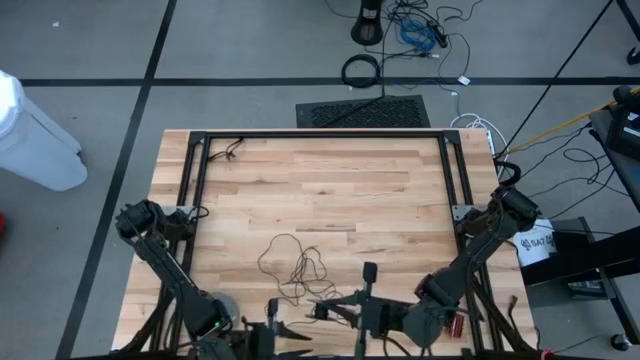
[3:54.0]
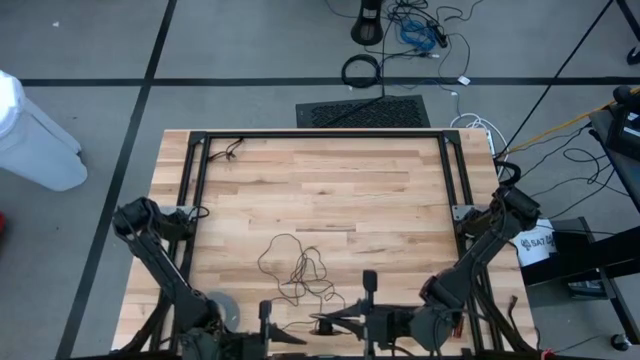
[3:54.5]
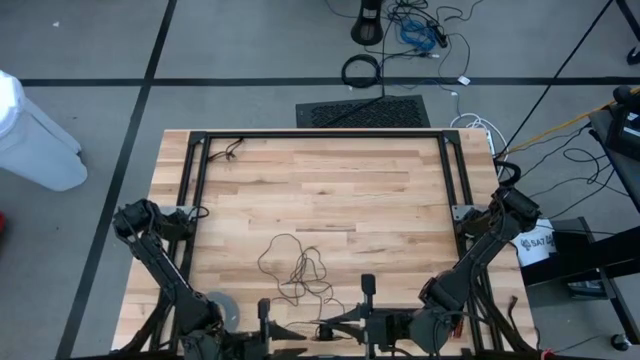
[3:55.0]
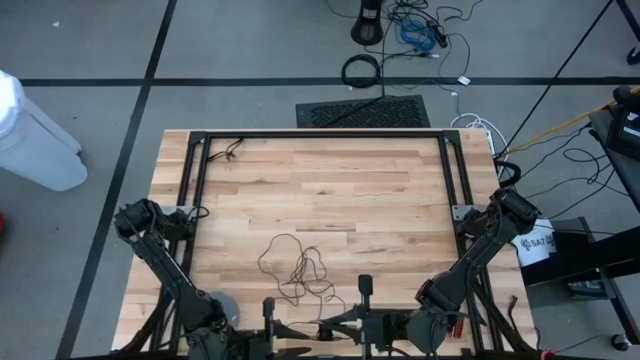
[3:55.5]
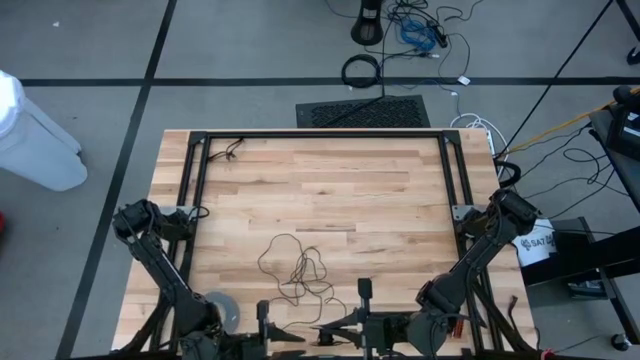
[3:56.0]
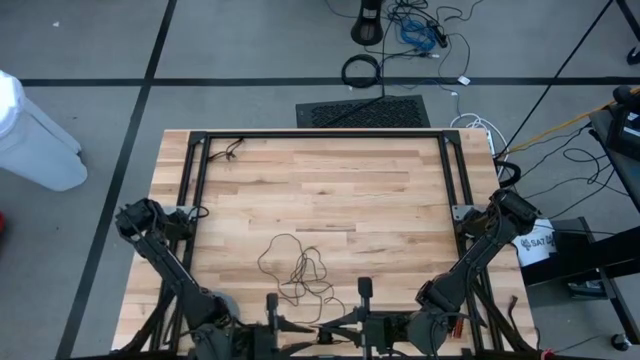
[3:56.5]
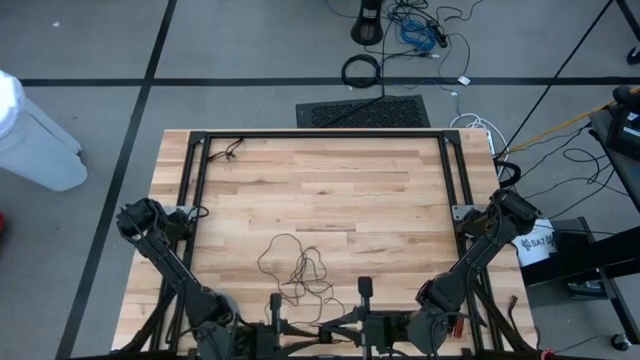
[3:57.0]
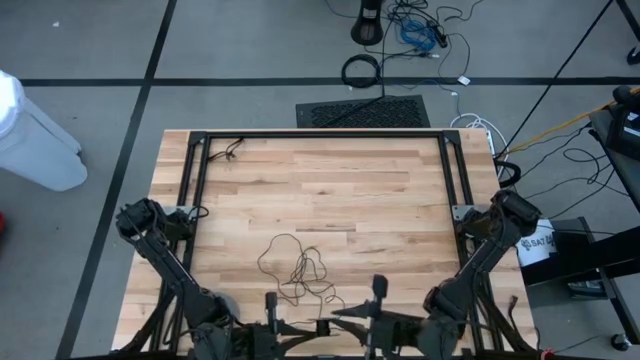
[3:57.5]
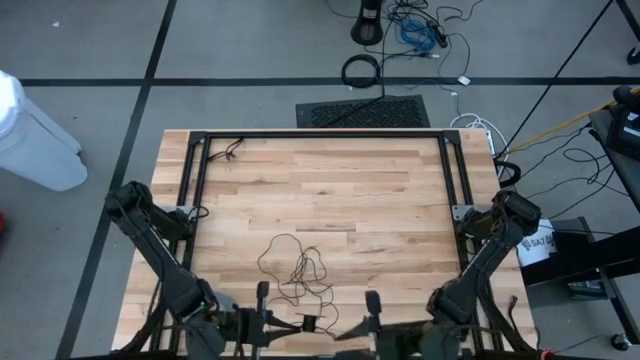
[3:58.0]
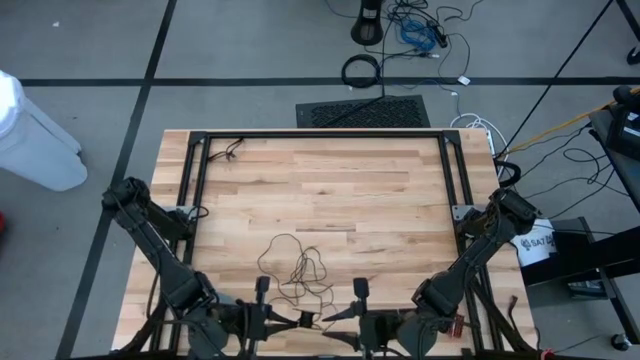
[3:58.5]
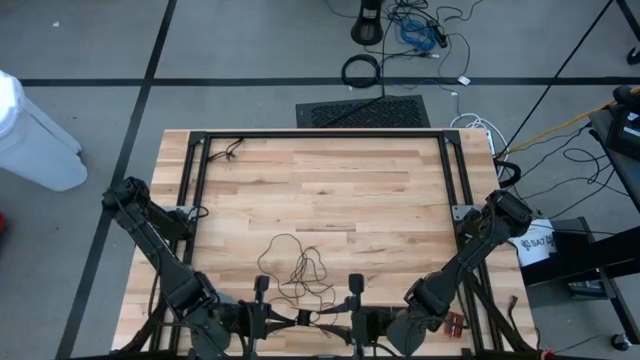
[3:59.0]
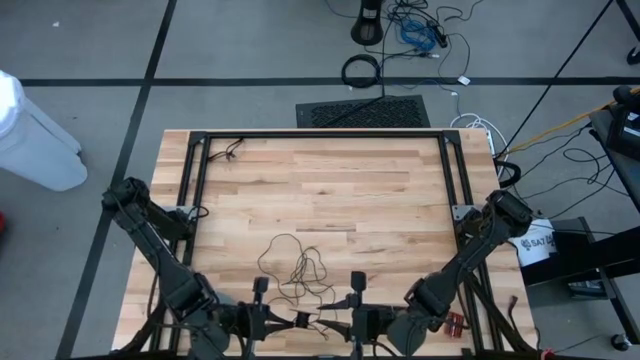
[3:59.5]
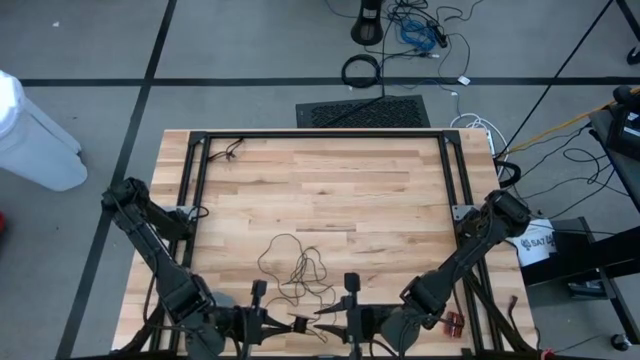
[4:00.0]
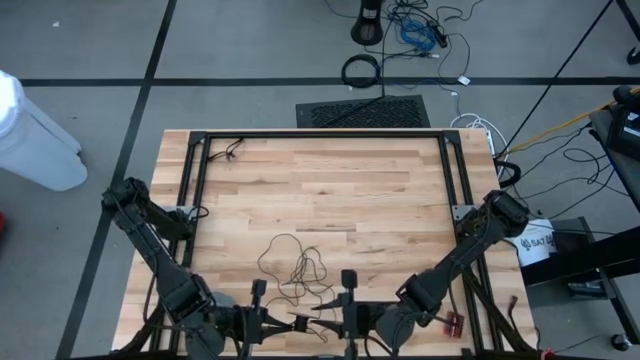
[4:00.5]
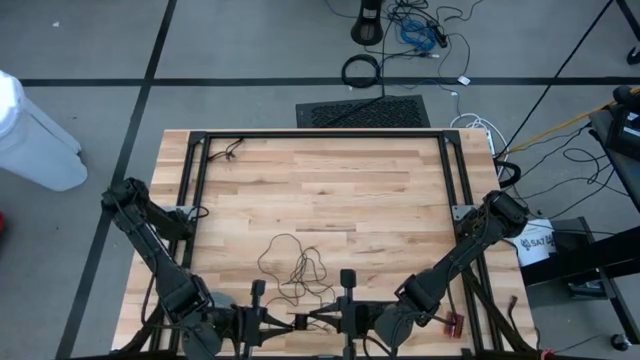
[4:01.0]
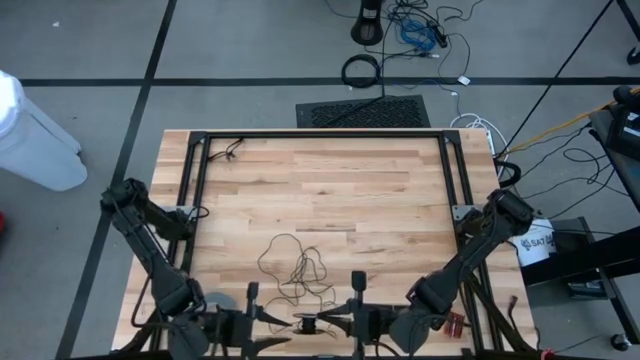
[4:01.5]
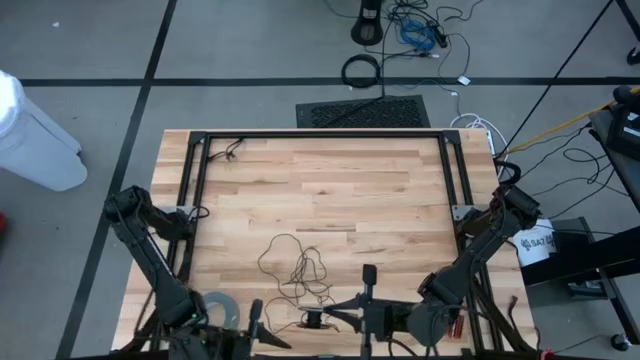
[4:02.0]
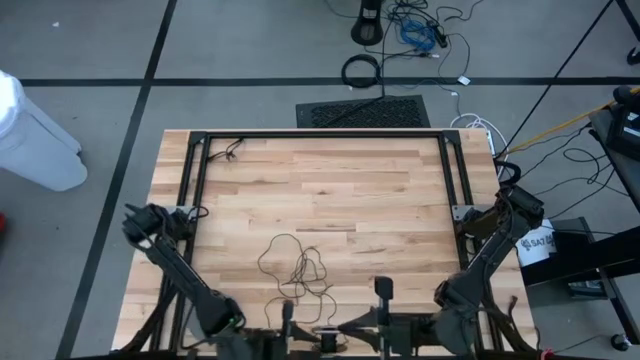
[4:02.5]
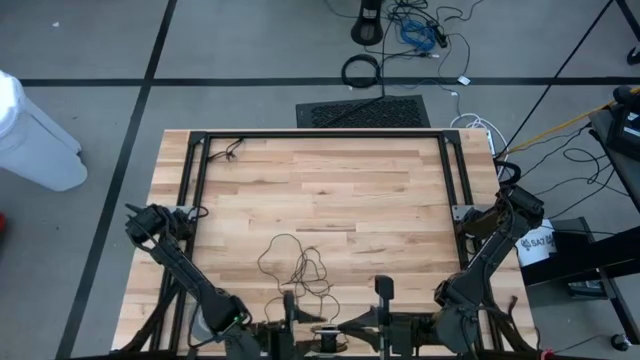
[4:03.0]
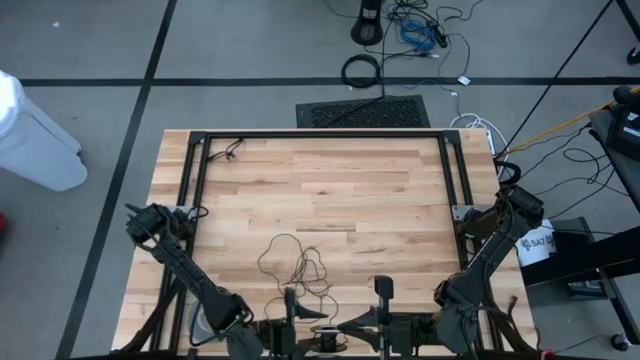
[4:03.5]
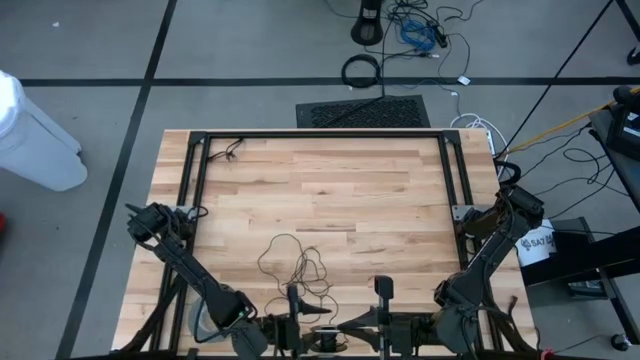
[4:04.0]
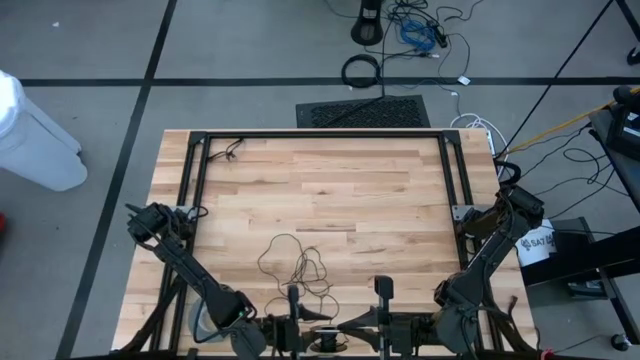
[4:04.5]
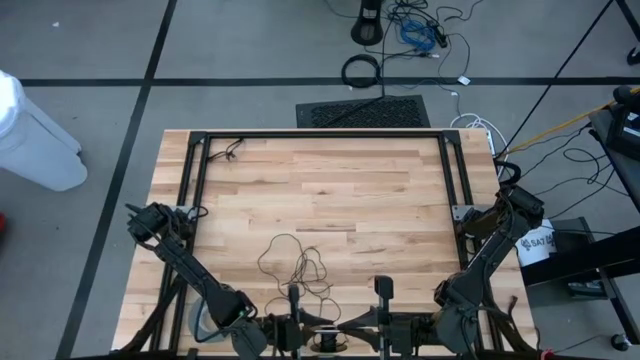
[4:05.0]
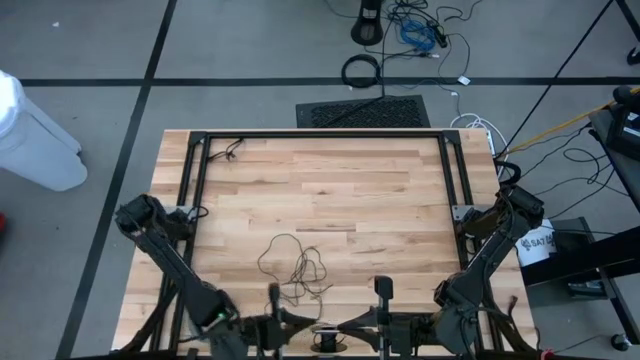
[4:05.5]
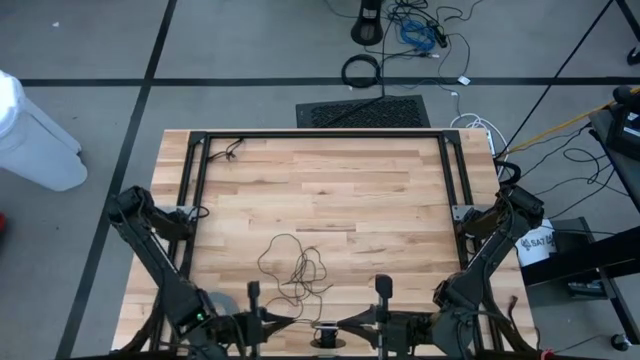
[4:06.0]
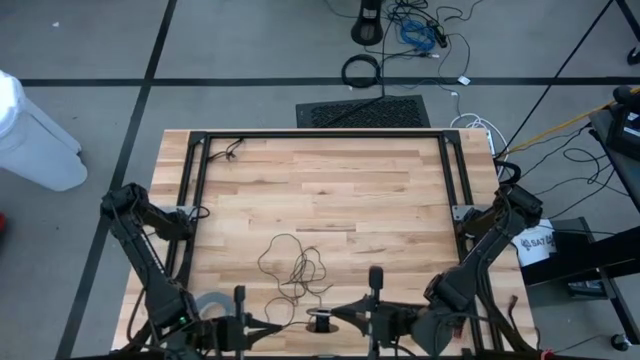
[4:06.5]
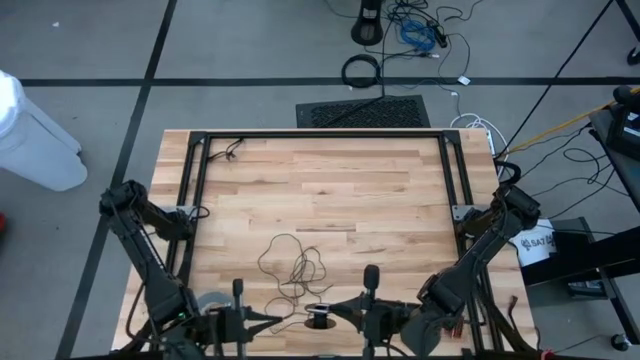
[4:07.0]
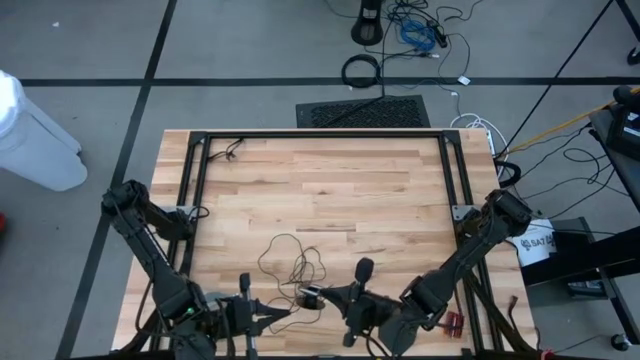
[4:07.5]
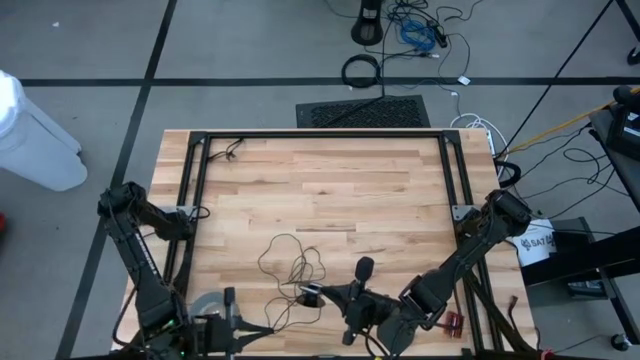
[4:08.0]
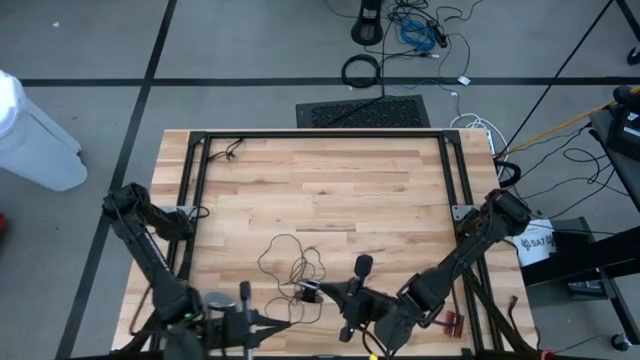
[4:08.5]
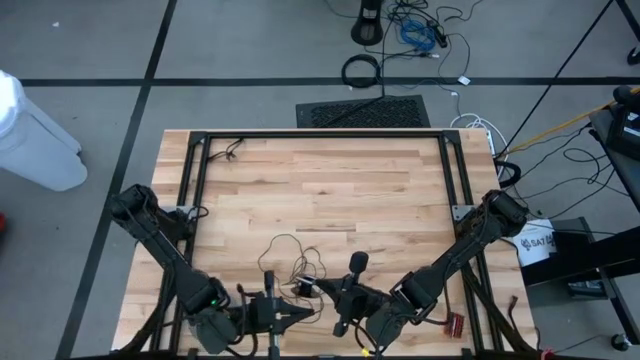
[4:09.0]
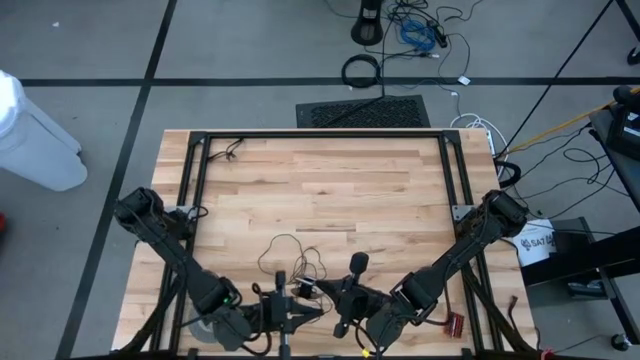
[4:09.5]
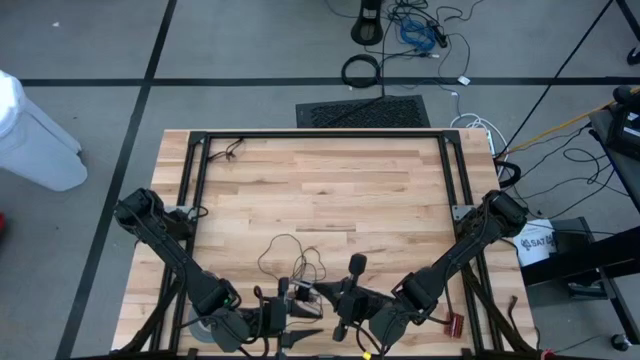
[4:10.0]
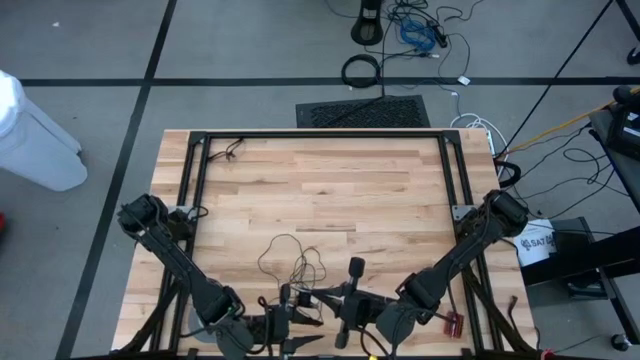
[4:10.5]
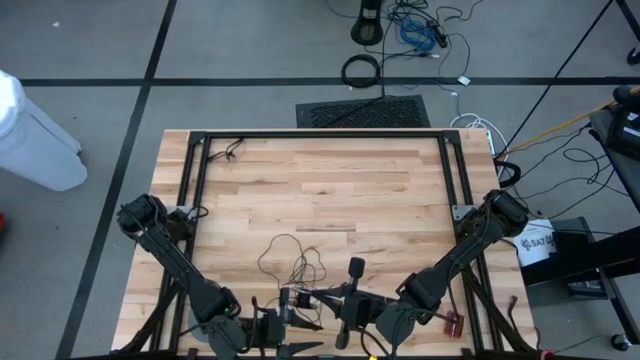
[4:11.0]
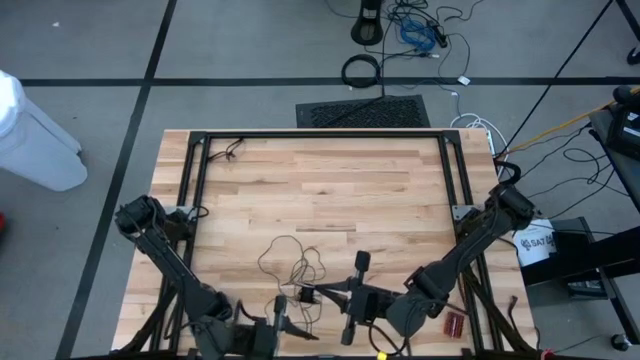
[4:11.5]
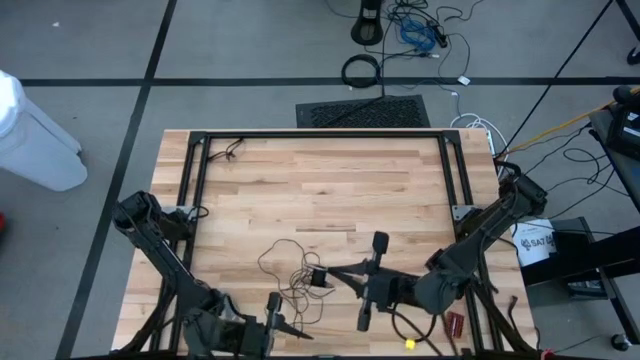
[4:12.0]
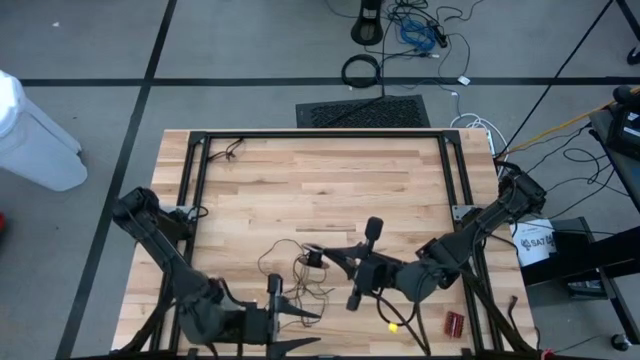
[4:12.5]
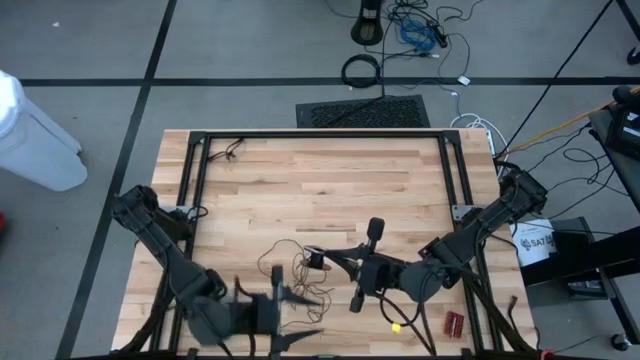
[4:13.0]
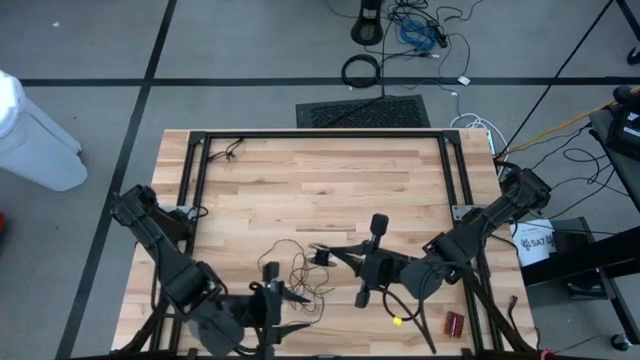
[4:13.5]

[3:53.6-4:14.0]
Task: Coil cords
Coil the black wire onto the spool
